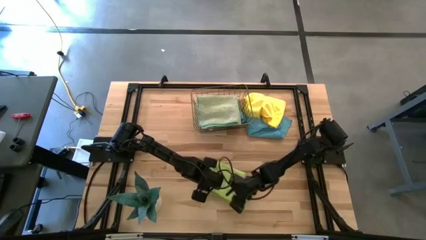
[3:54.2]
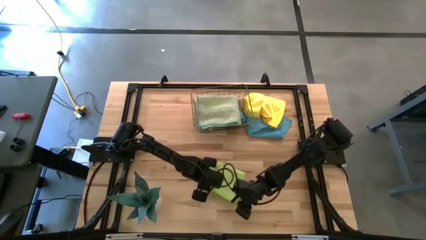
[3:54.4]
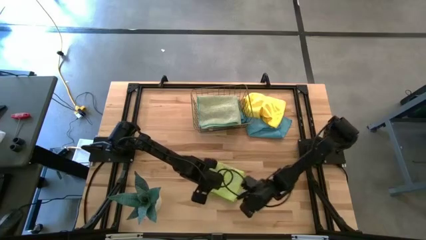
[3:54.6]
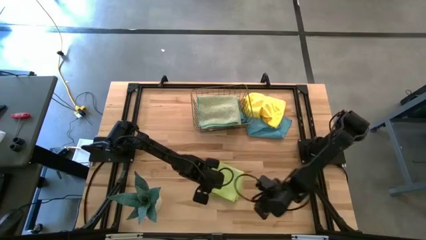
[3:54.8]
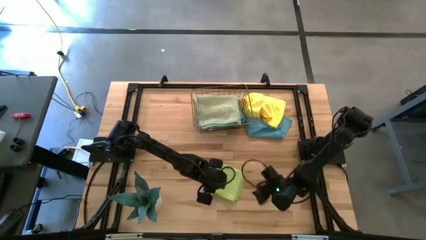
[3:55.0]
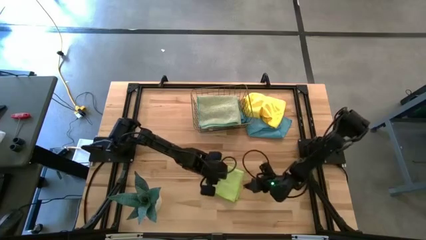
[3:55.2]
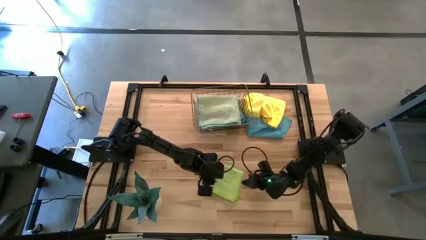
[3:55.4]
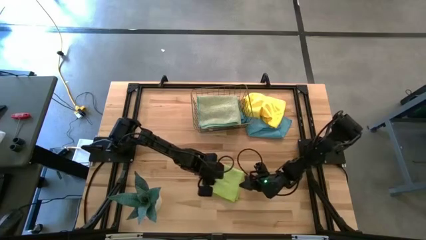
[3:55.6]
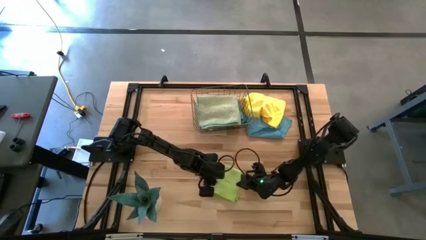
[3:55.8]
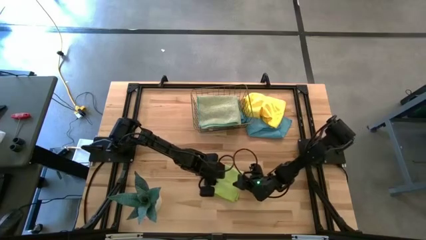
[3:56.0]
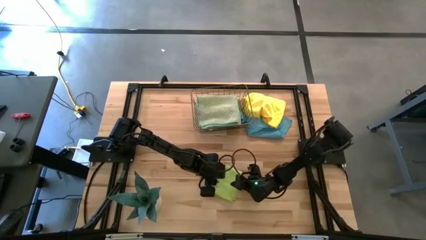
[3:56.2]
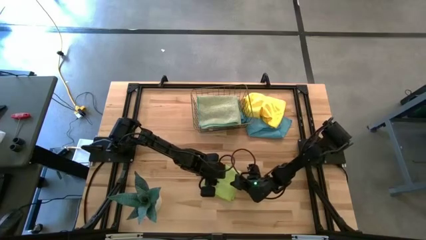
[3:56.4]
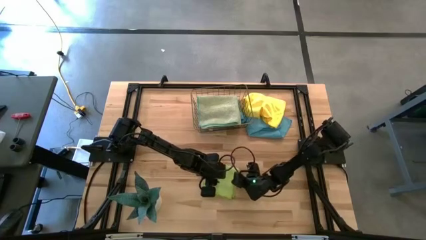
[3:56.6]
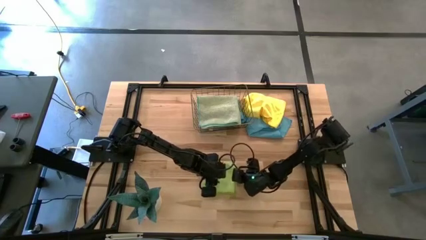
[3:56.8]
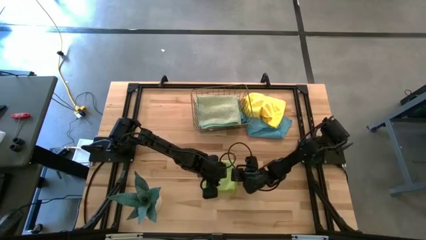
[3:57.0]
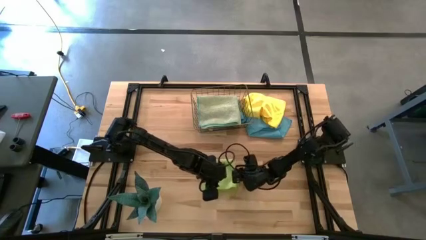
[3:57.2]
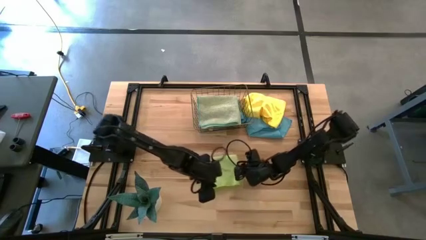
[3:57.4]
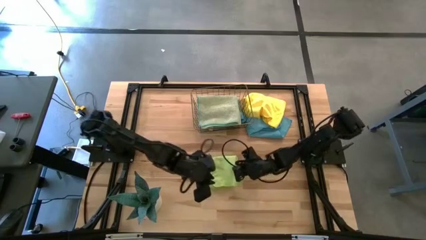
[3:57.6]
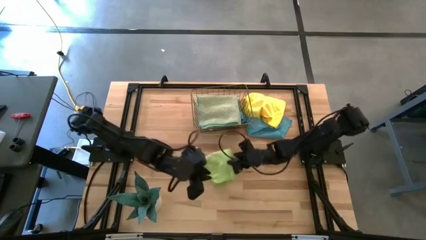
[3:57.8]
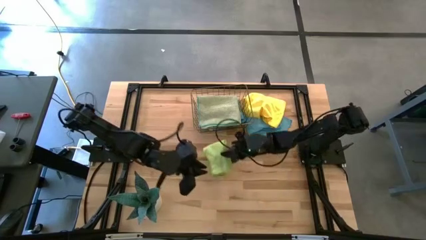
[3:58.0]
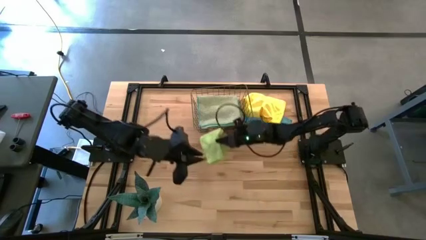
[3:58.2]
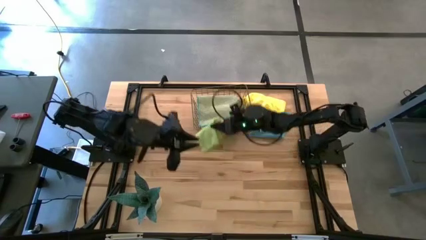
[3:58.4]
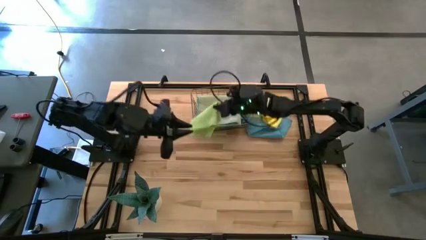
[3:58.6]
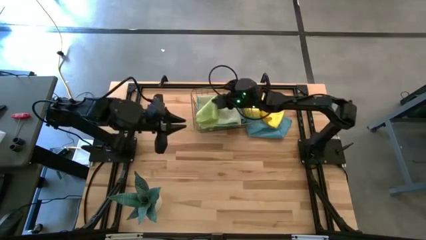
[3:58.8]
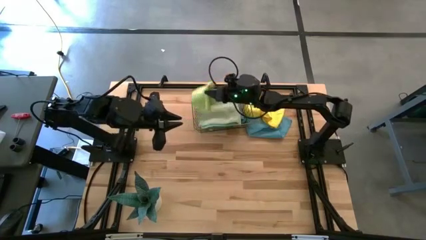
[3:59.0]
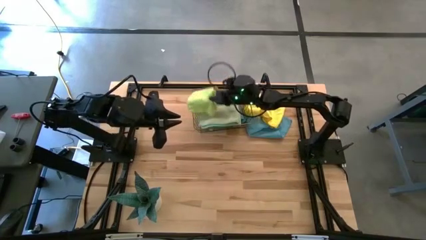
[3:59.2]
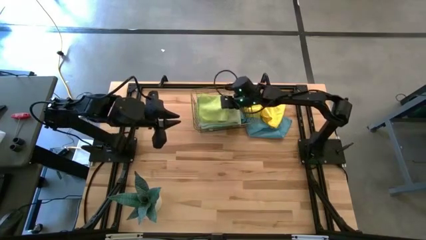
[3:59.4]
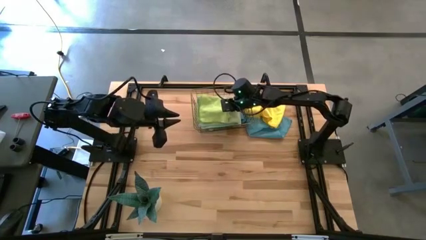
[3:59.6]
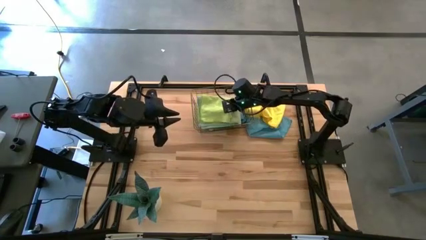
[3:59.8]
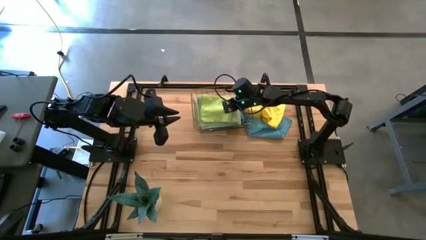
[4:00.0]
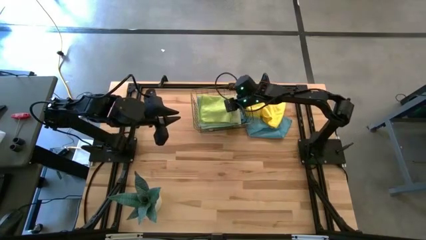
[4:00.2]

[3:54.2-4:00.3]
Task: Fold microfiber towels
Stack the green towel on top of the stacked towels into the wire basket

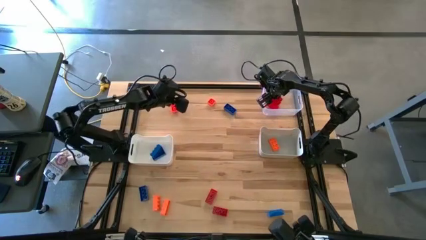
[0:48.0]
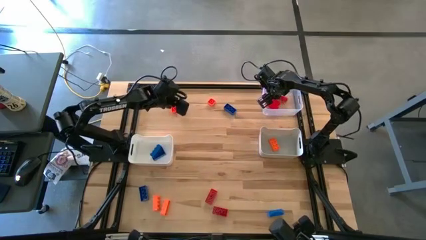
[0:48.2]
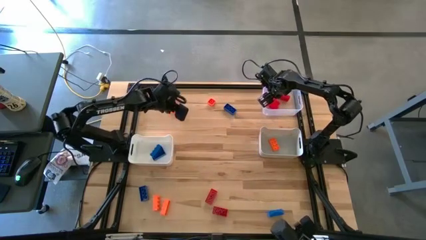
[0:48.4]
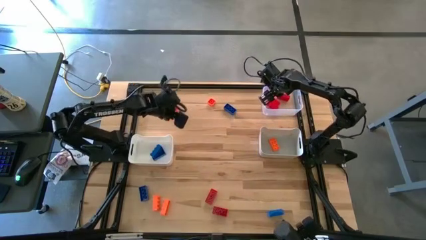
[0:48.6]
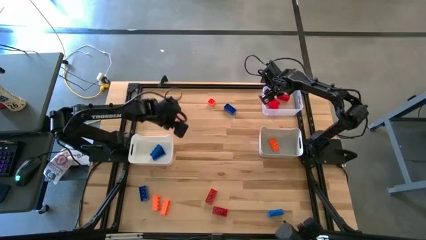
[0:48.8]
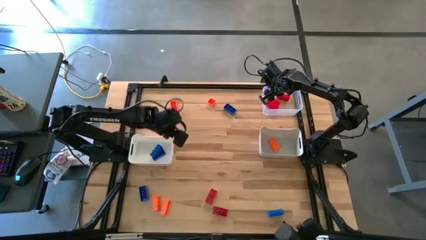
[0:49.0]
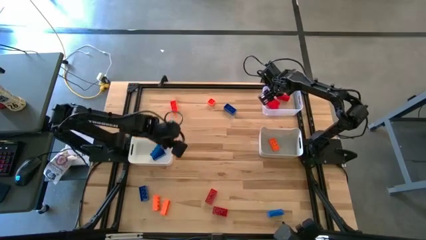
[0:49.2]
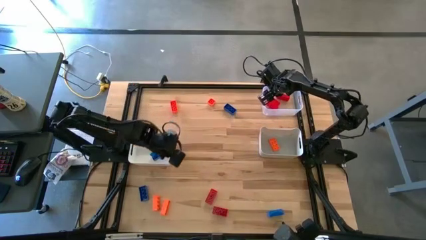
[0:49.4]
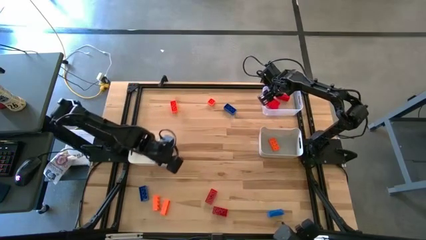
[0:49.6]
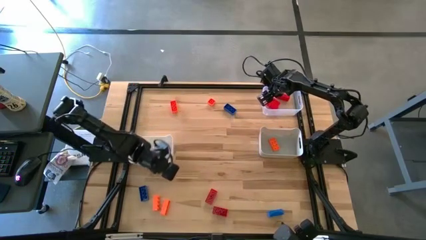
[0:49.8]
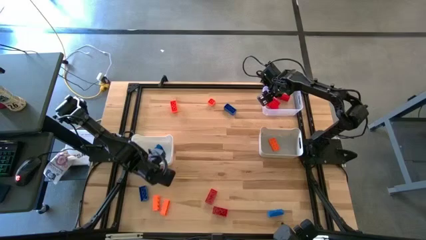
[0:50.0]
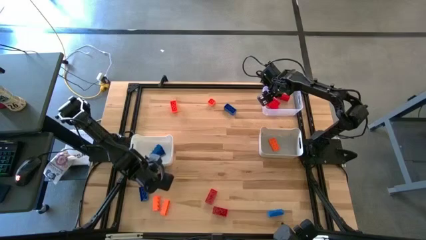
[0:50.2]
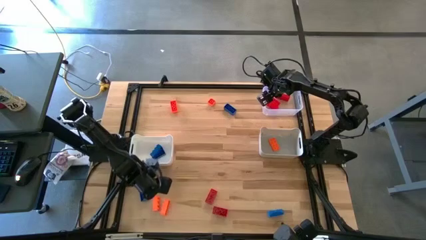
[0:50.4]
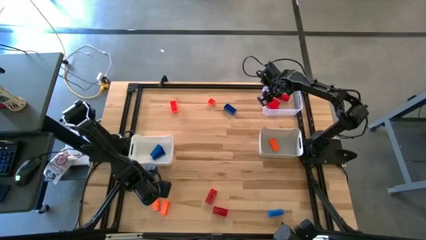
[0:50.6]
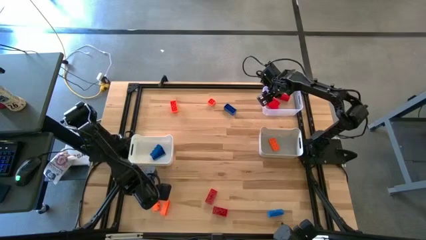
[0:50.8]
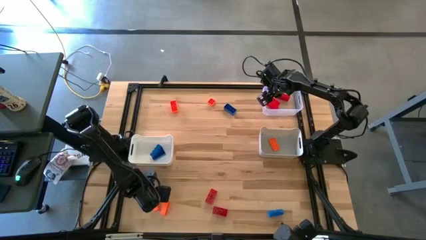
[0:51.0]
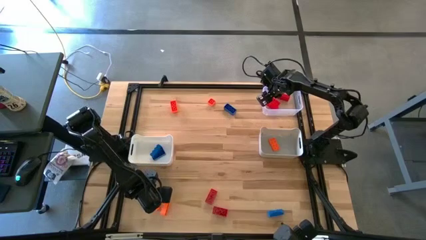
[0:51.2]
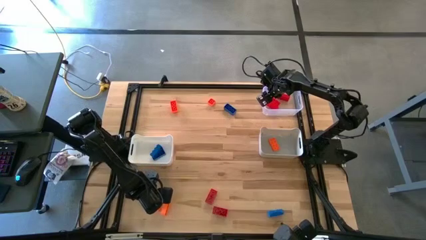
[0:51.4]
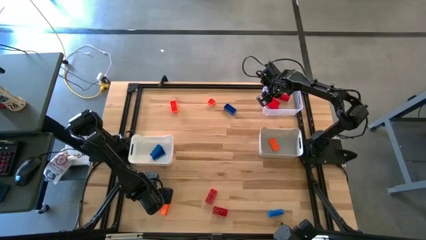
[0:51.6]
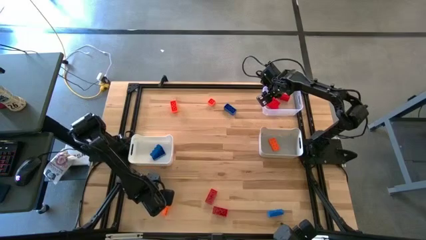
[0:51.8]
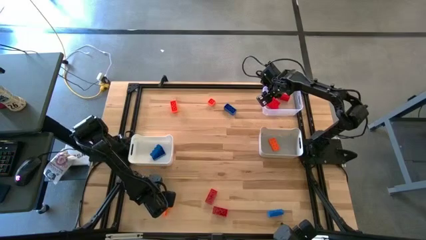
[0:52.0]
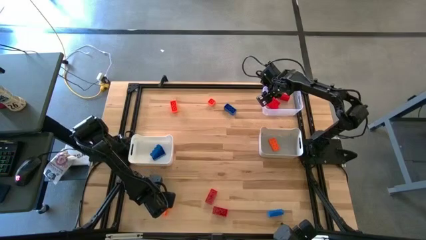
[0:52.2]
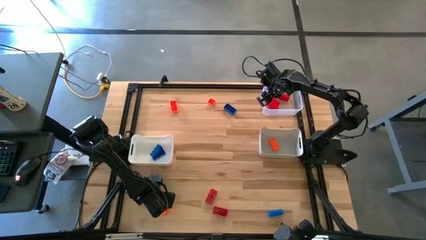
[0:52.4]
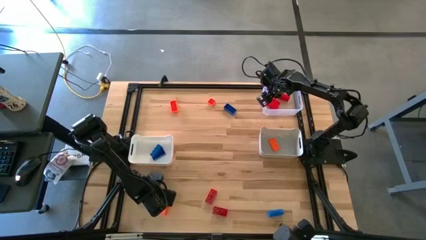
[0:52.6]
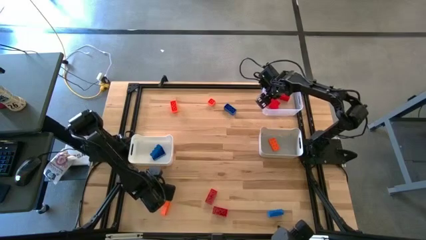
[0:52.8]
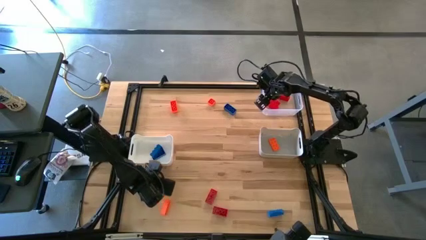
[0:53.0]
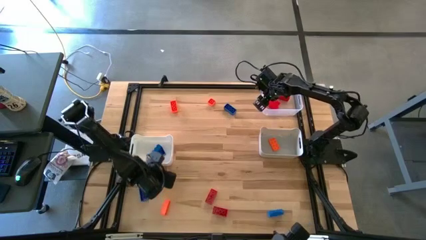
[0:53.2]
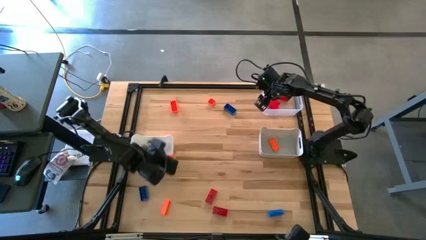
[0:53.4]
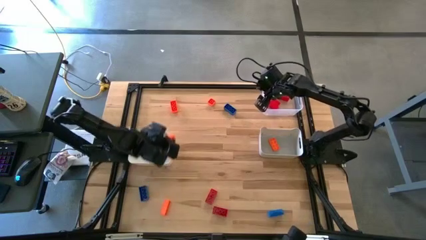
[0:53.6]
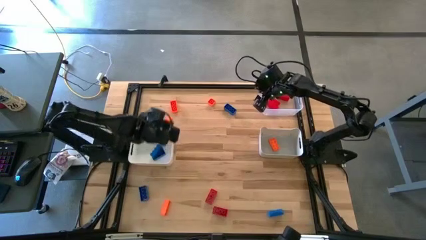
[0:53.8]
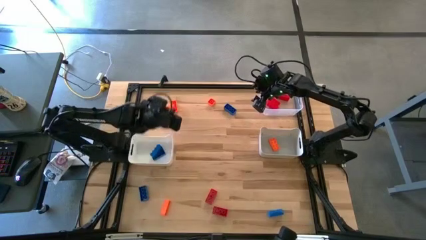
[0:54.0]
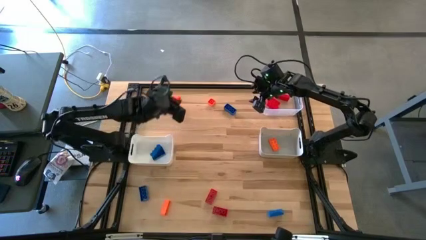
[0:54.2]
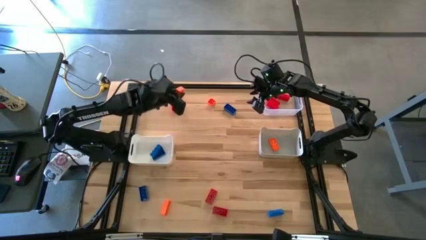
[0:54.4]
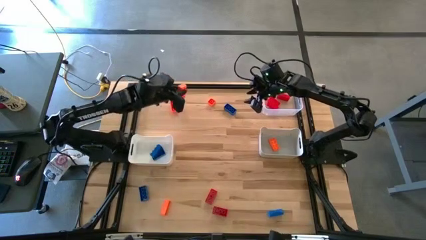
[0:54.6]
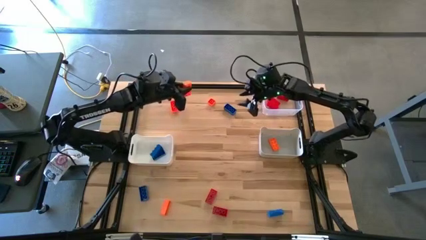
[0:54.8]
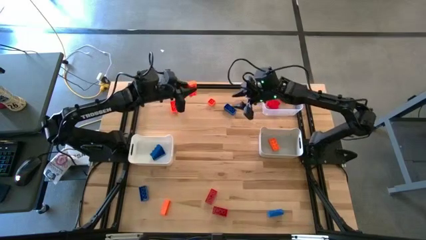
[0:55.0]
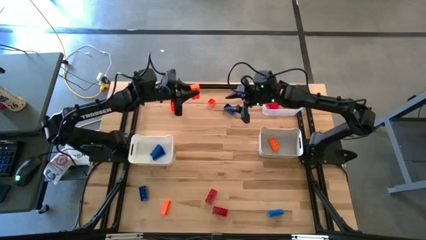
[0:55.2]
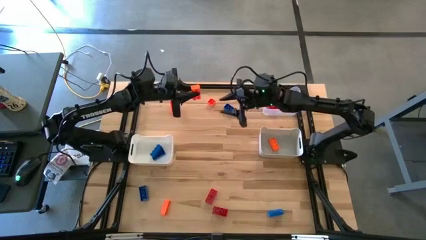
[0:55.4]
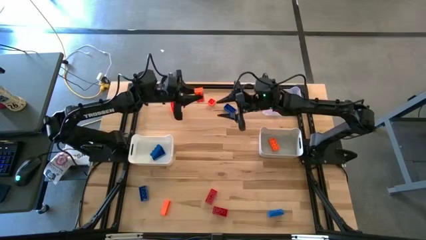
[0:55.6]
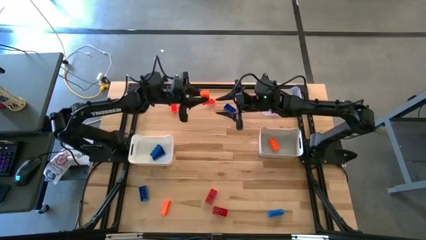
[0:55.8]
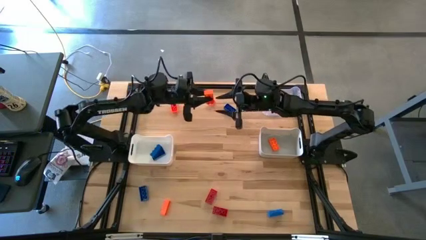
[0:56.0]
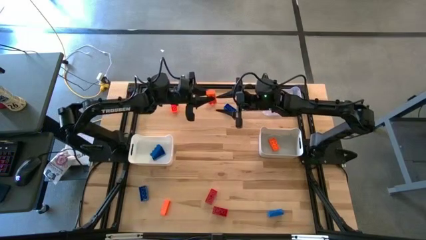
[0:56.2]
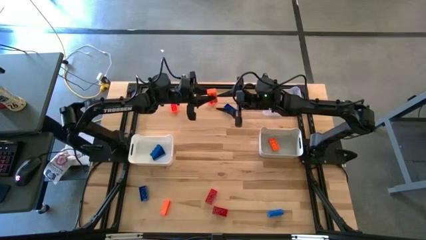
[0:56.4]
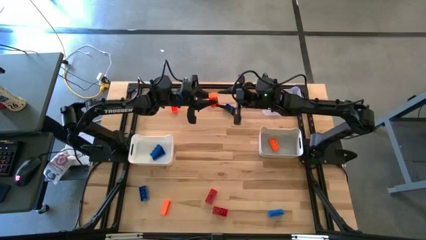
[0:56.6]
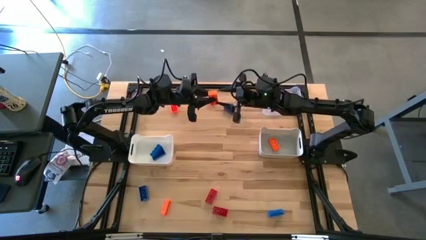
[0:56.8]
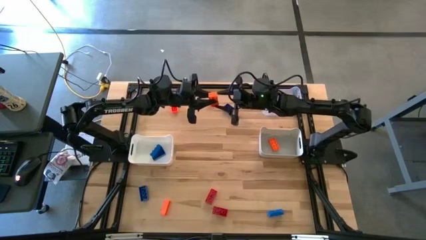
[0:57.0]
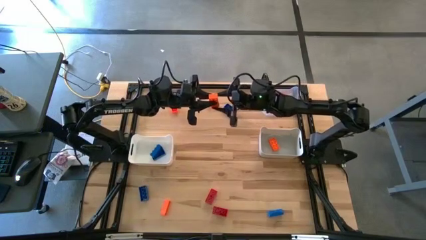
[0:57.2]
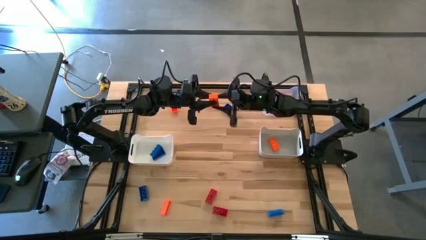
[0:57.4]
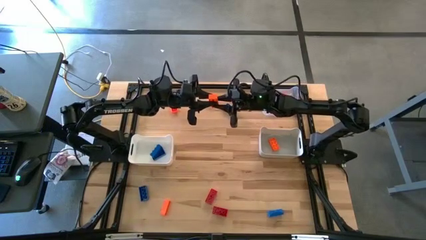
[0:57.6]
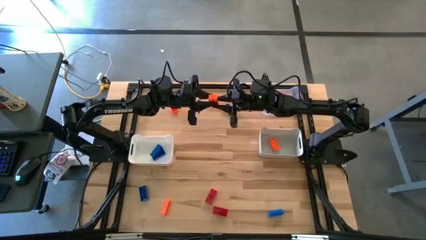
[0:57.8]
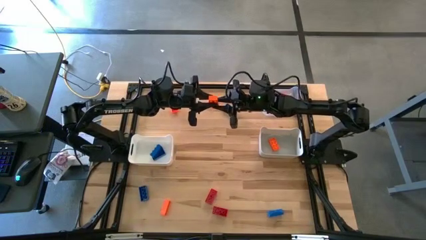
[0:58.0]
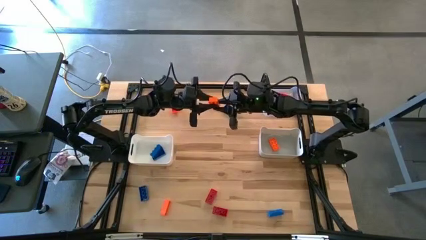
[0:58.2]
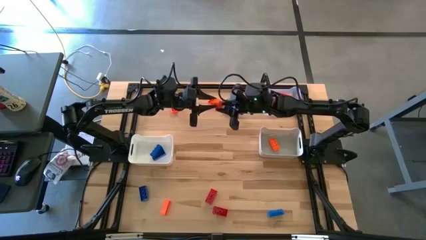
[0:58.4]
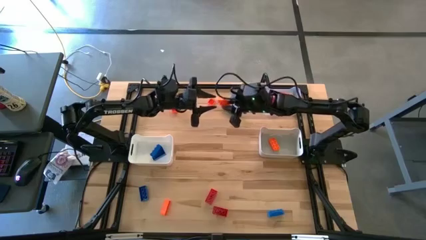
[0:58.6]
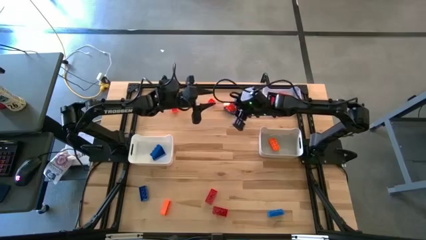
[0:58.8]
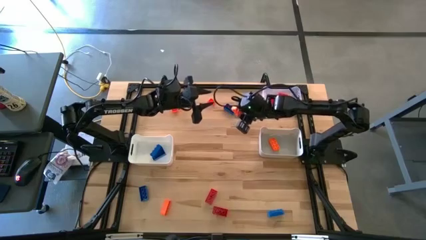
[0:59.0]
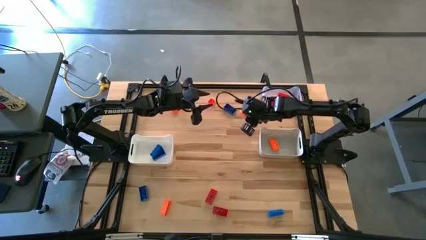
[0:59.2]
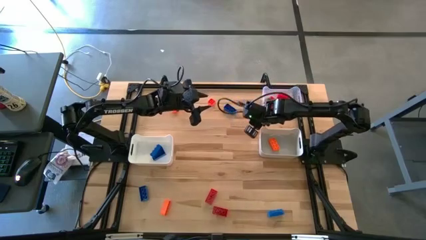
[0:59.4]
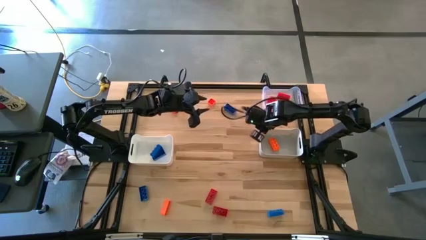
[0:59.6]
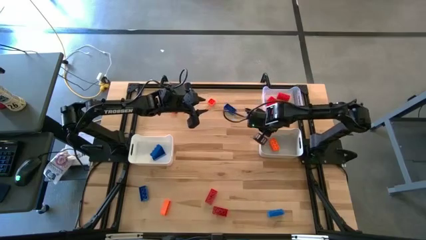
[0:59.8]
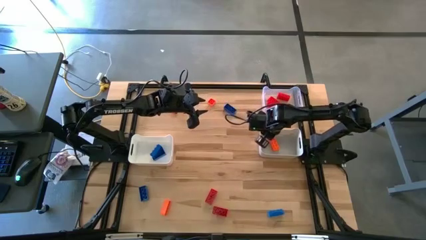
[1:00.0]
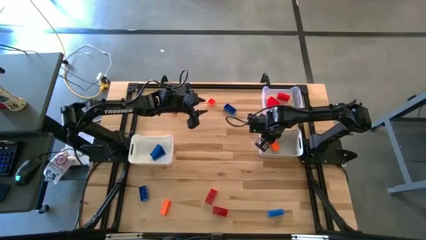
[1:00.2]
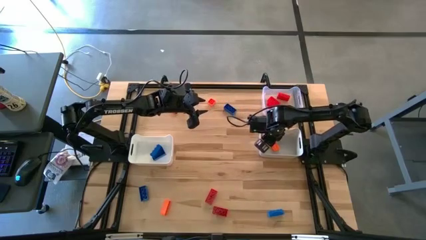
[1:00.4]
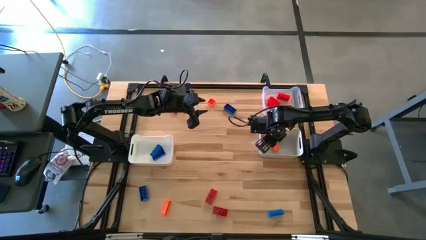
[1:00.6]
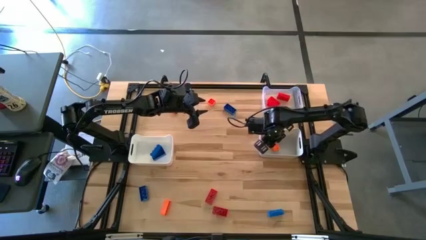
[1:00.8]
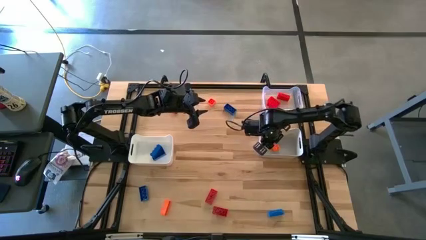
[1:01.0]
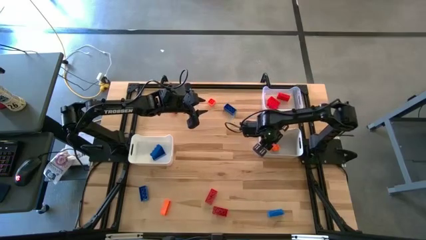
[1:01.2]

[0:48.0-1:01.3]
Task: Sort & place blocks by color
Put the orange game piece into the gray bin
